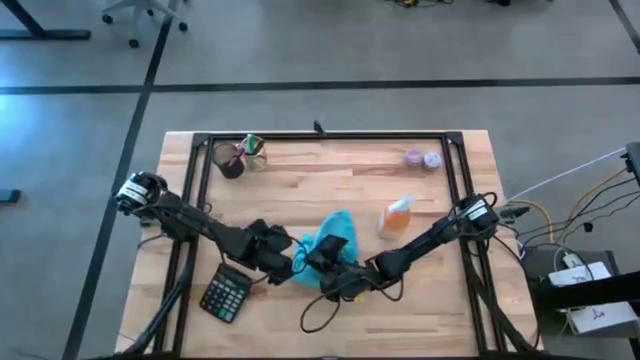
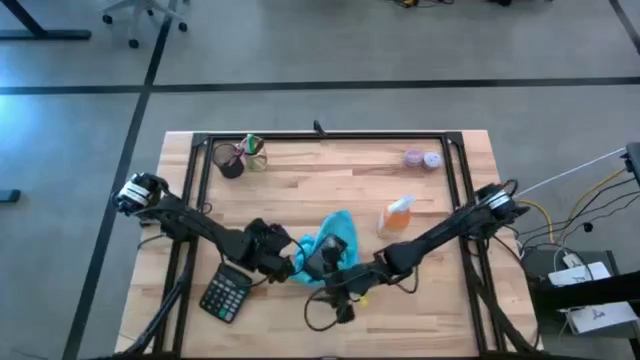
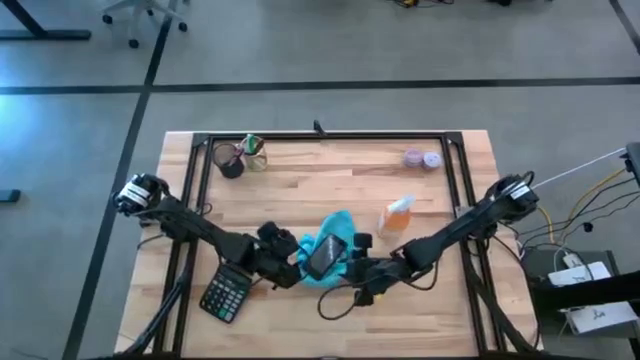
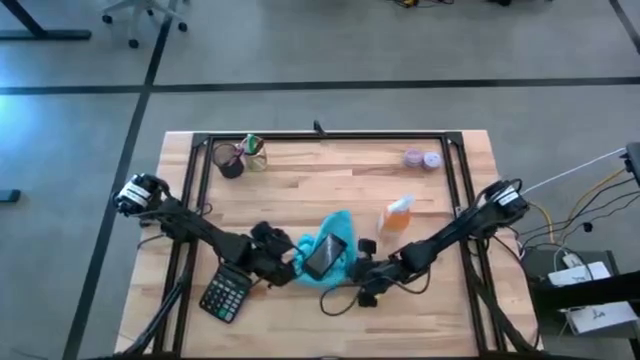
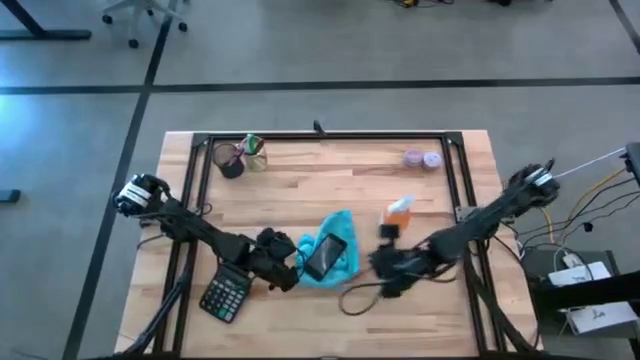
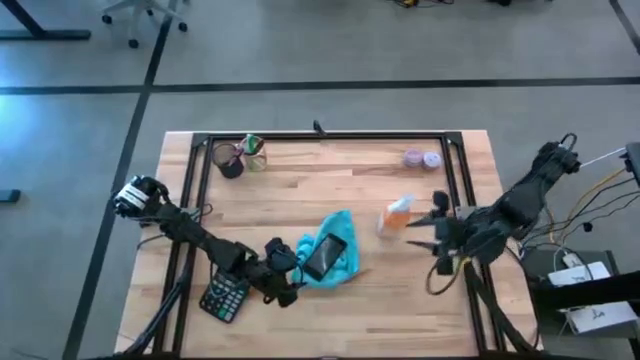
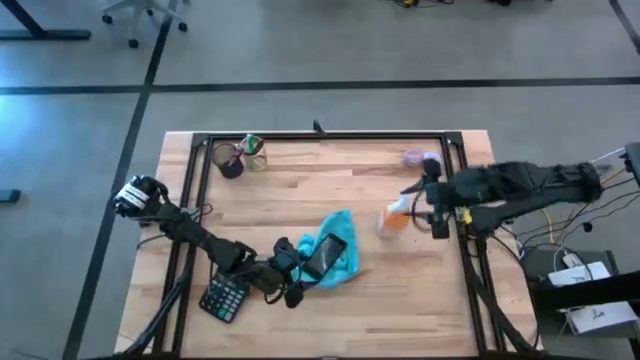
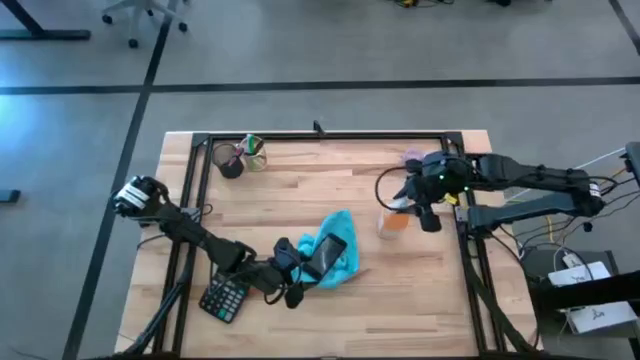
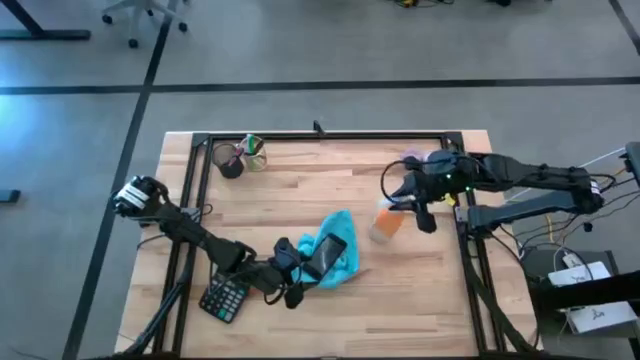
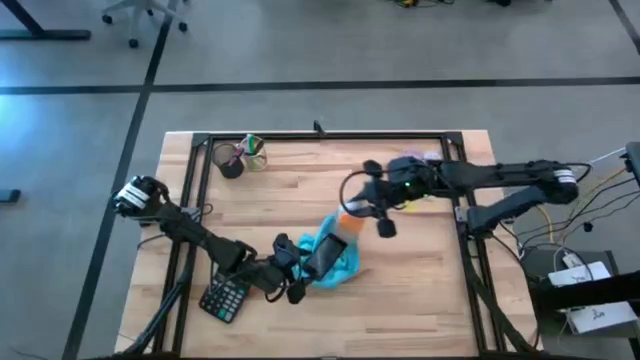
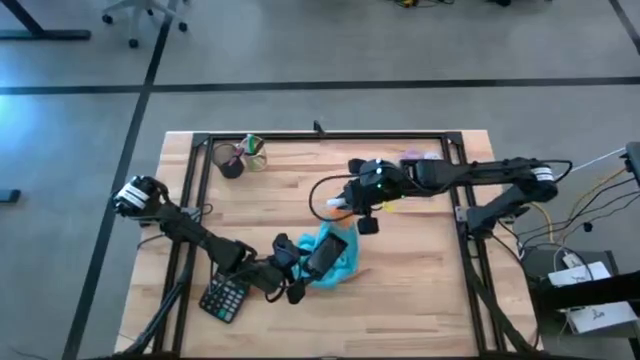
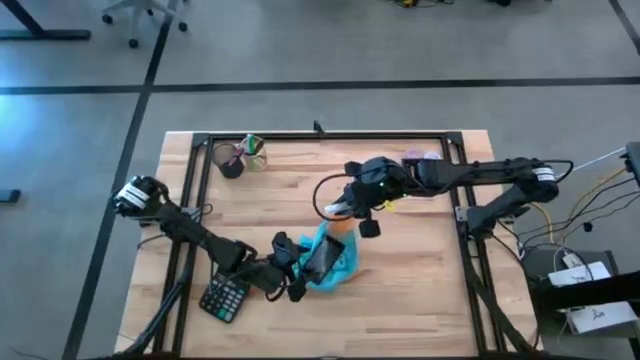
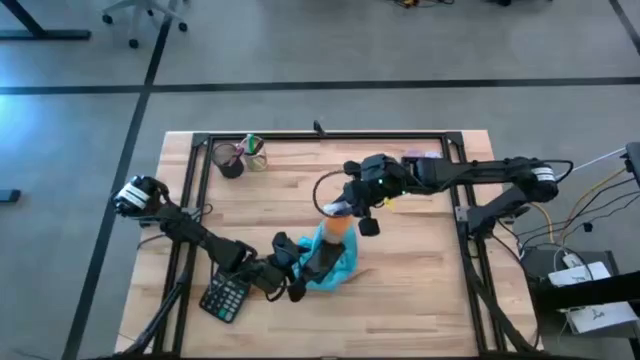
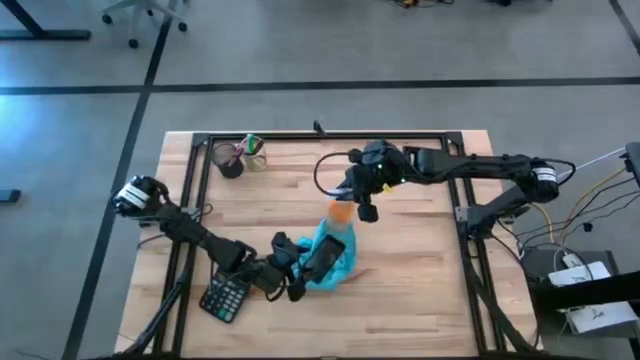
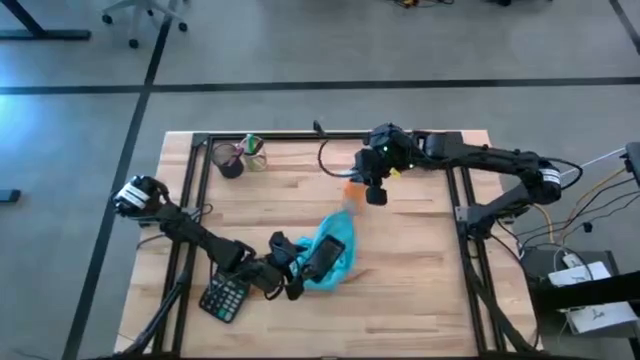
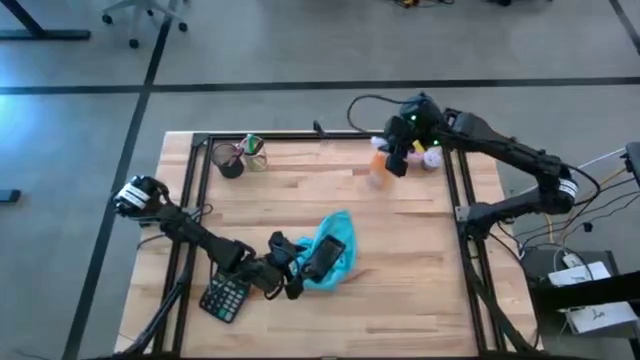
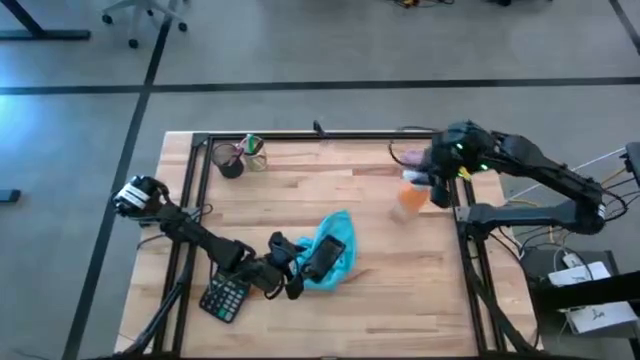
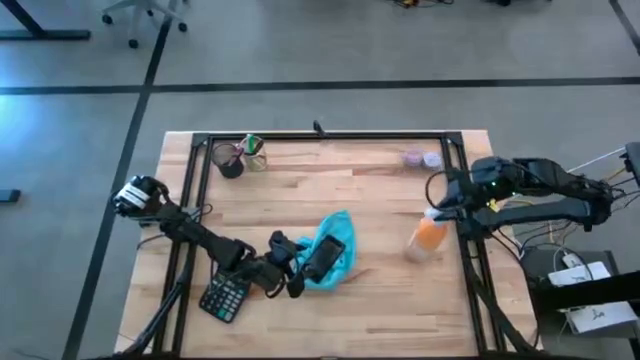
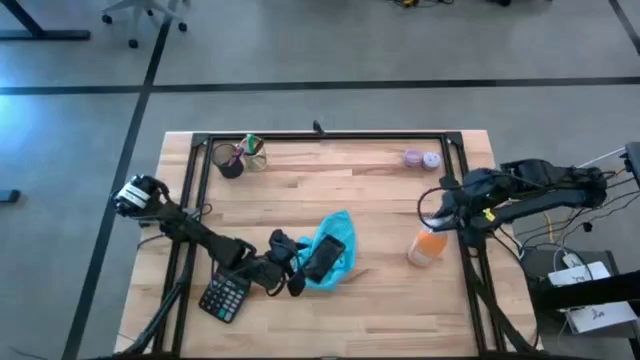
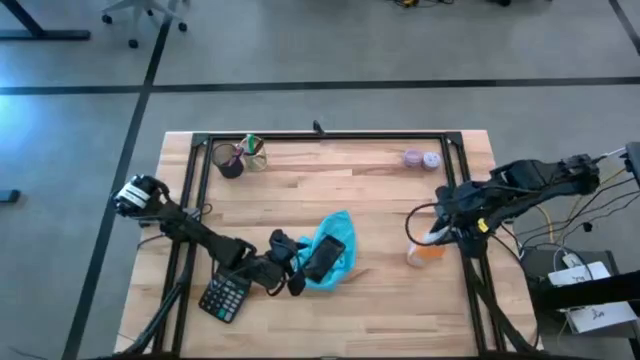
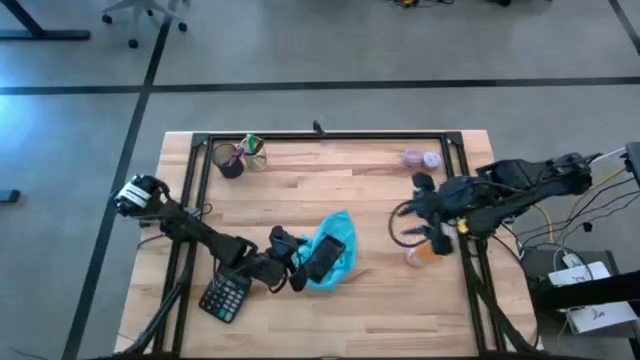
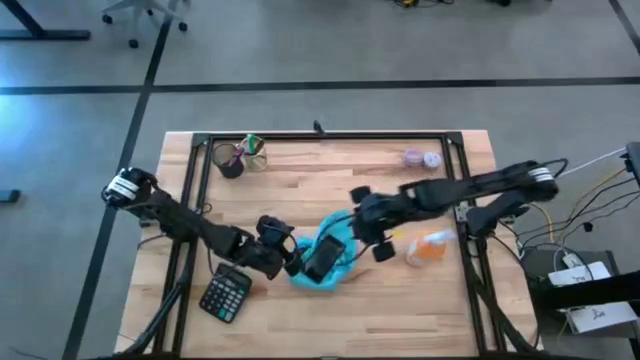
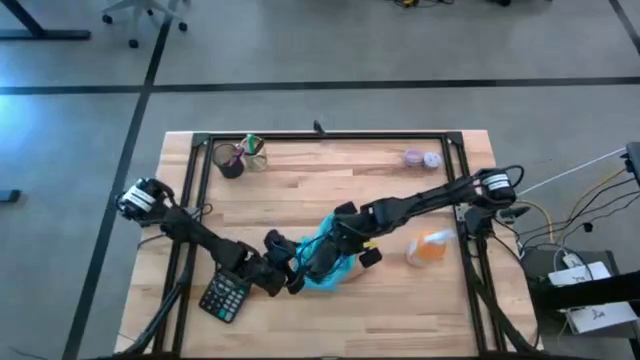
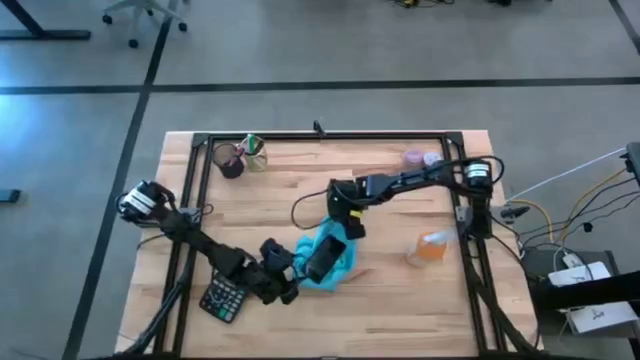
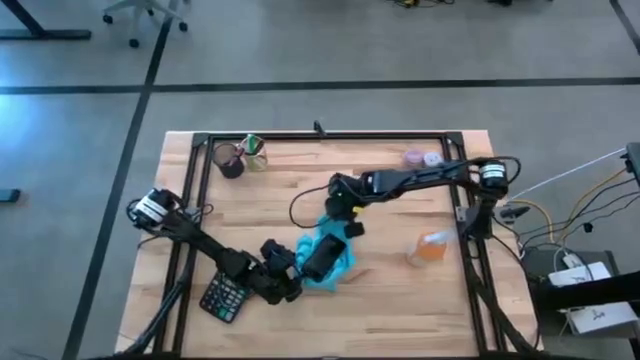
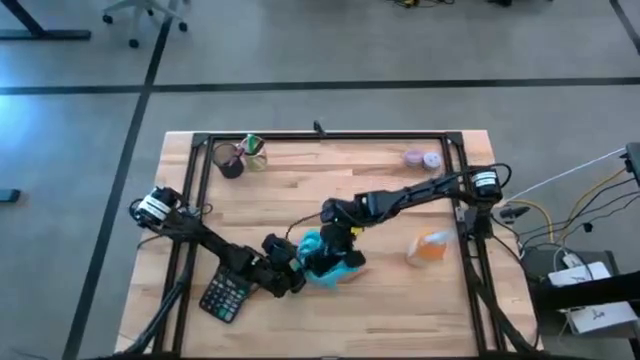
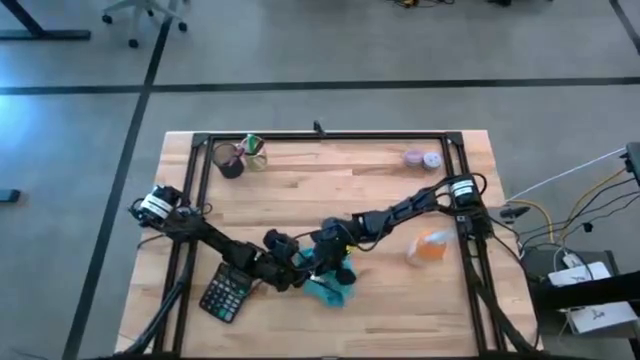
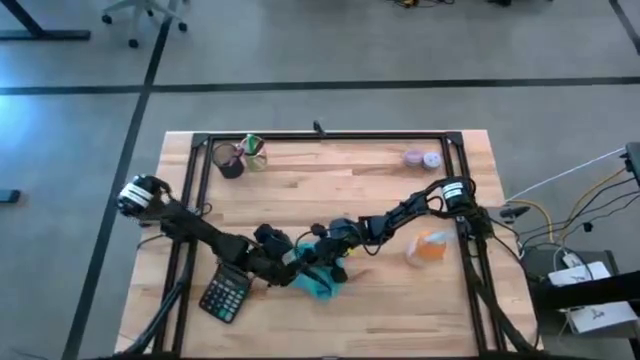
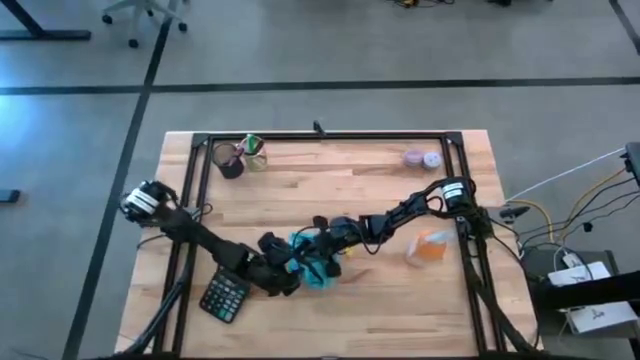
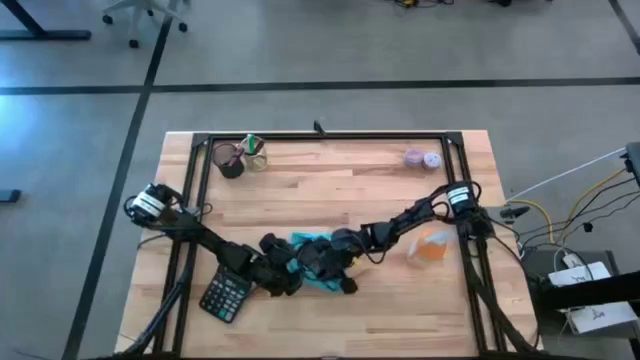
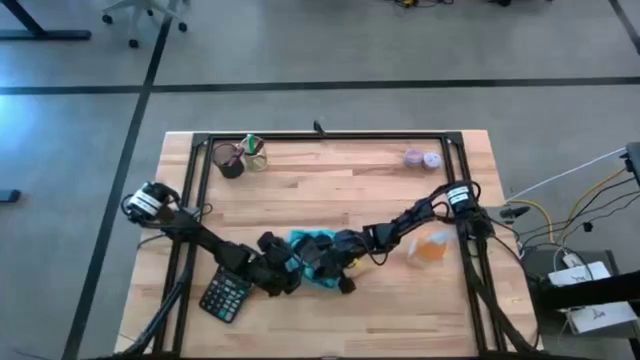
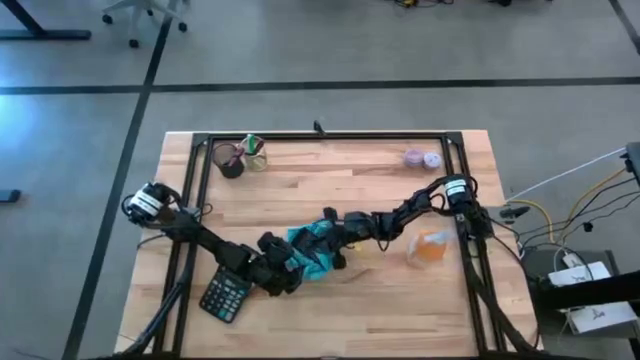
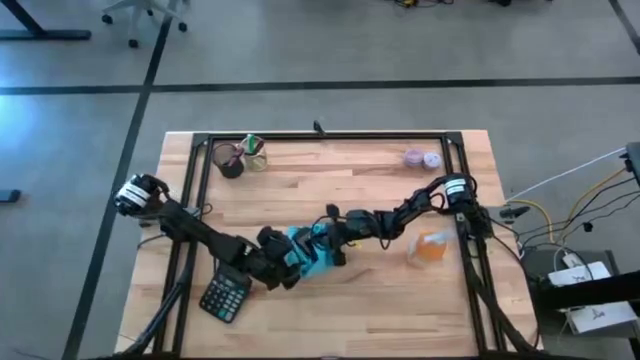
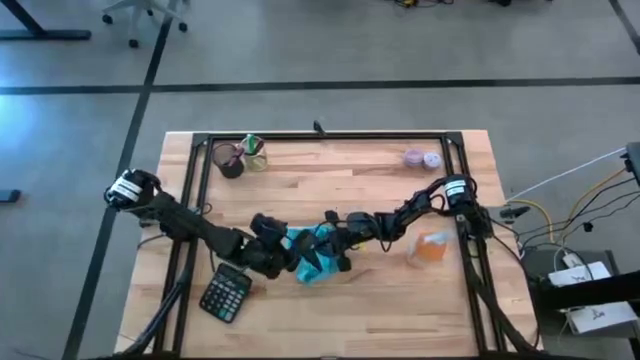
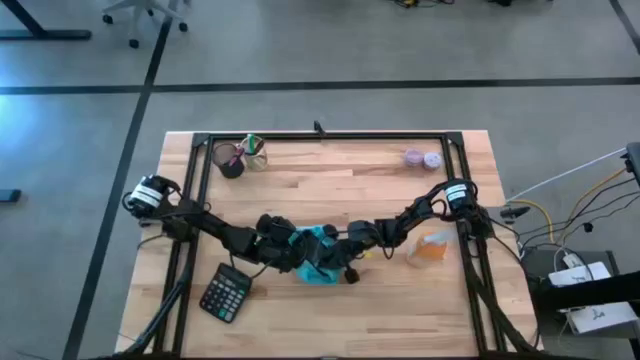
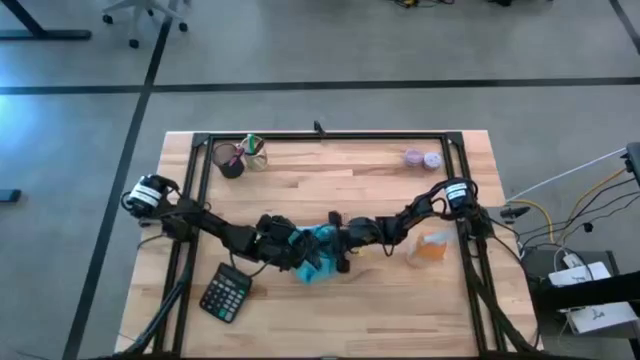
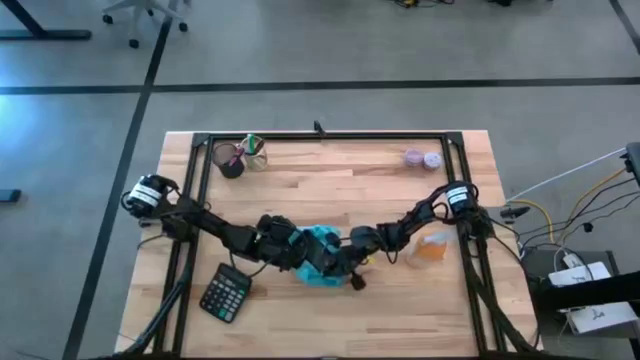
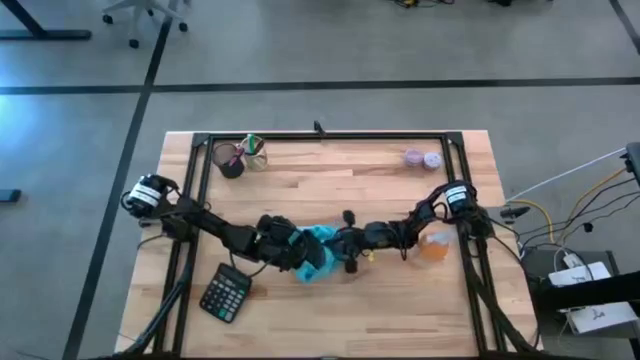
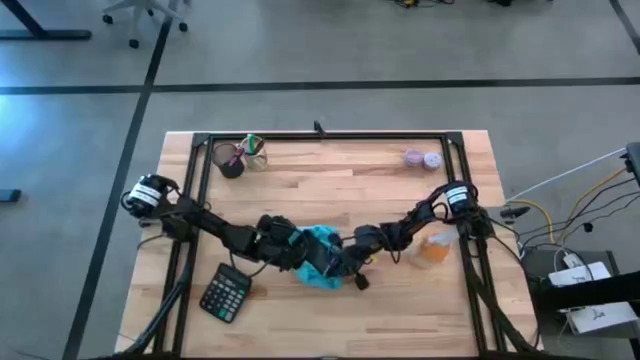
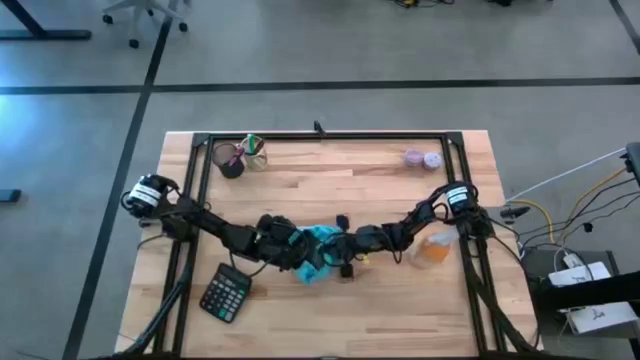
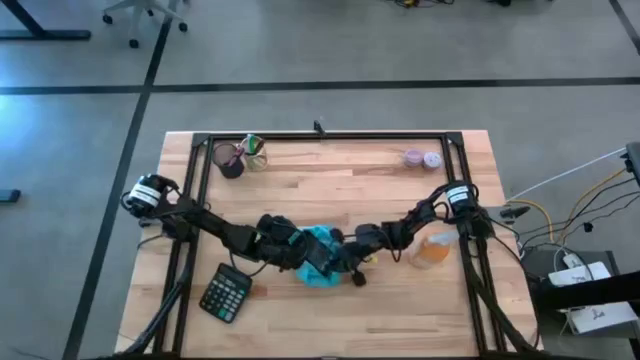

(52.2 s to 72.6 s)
Task: Apply microfiber cloth
Wipe the front of the cellphone with the blue microfiber cloth

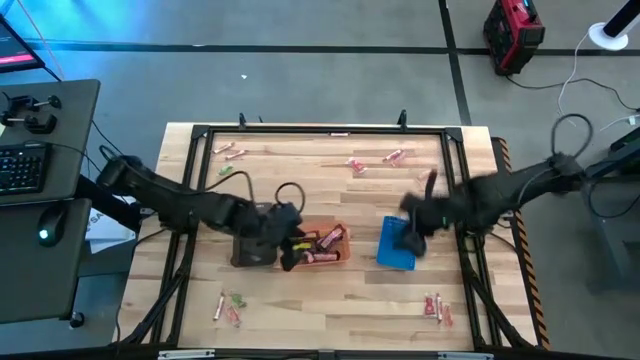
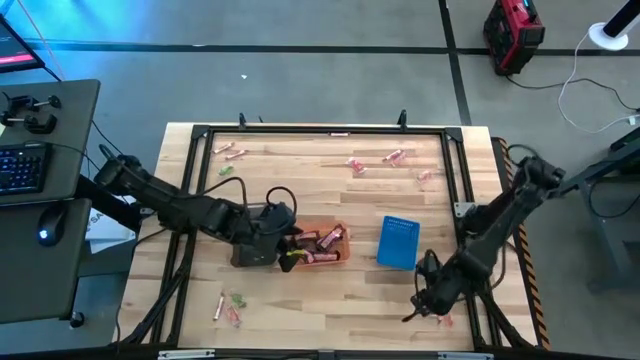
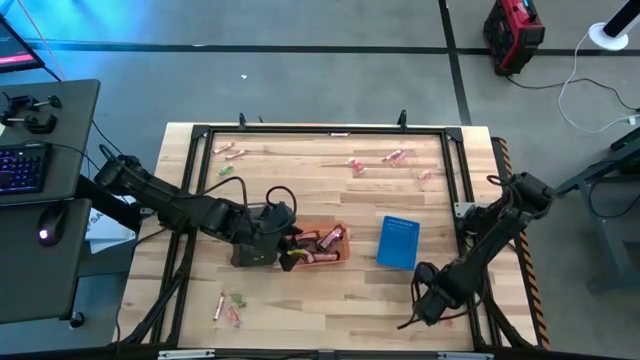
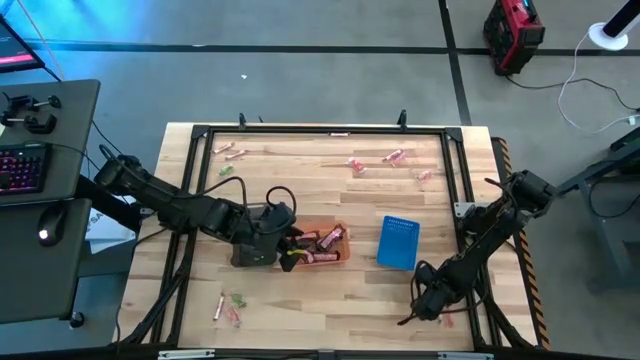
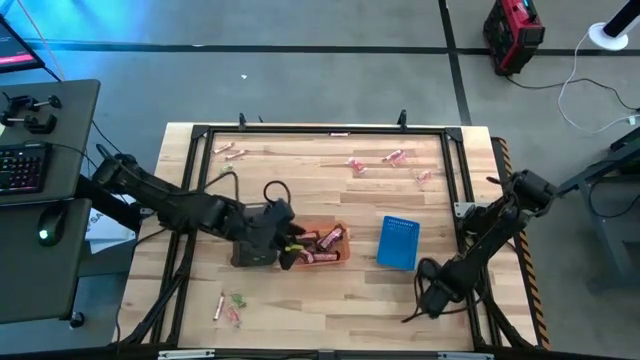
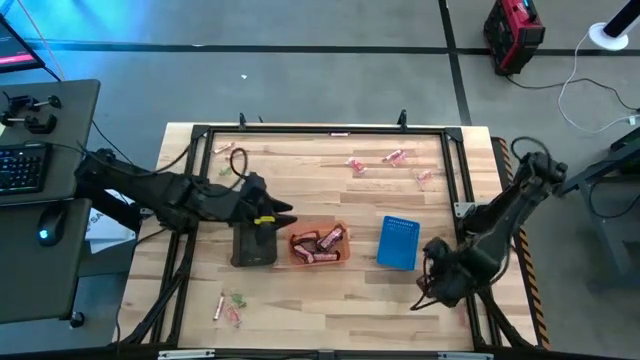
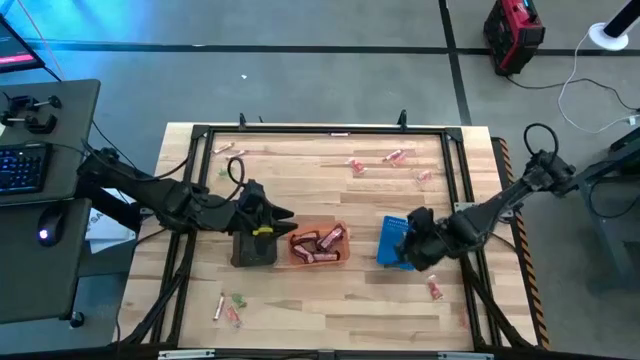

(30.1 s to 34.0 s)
Task: Sort candy by brand, put in halloween buckets
Put the white candy stick into the blue bin
